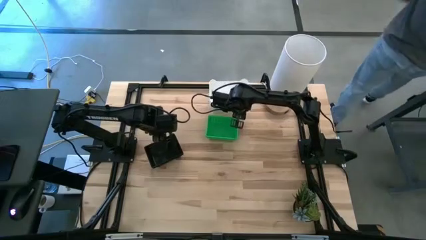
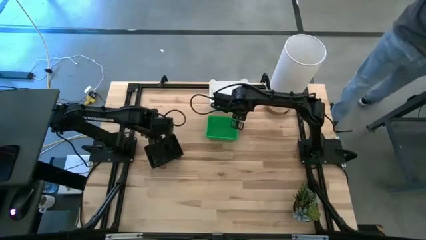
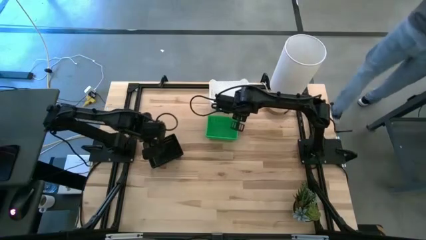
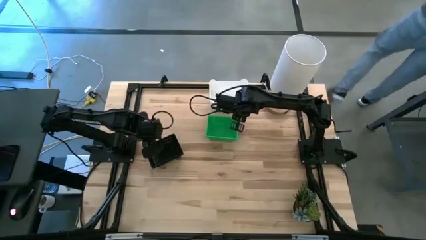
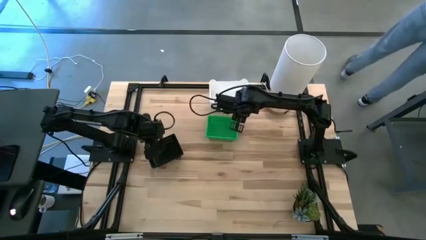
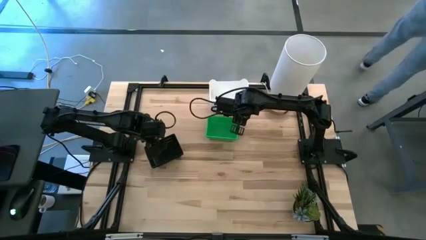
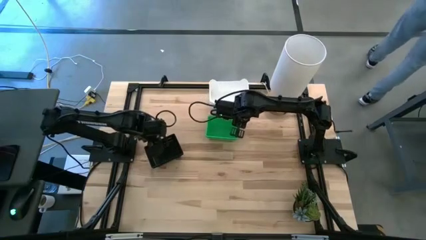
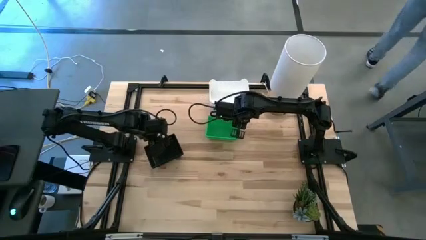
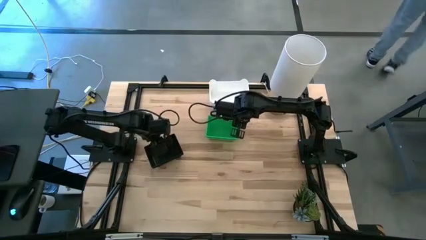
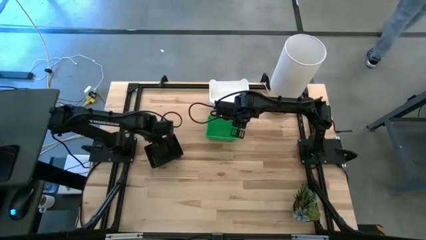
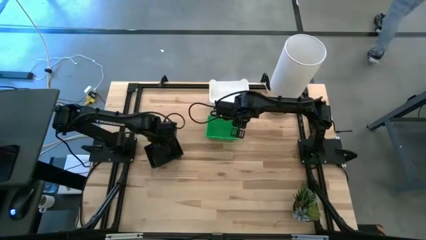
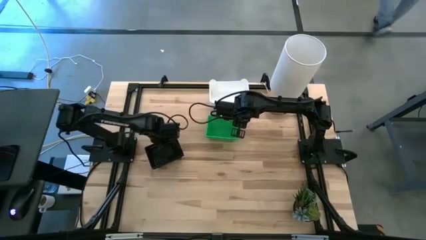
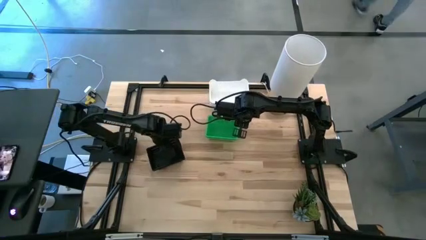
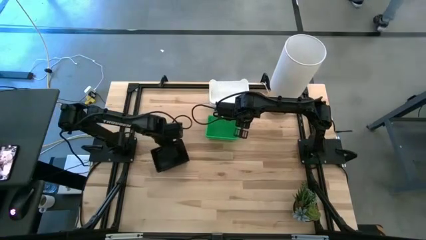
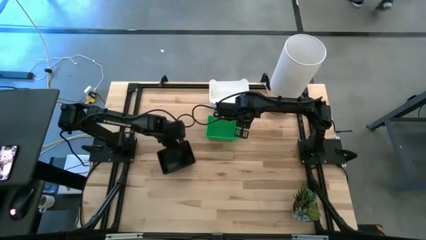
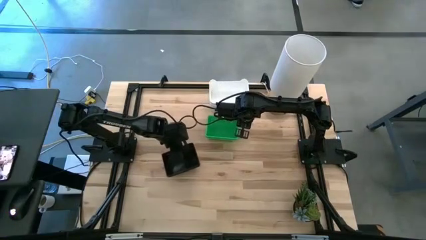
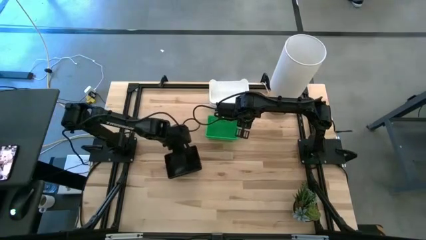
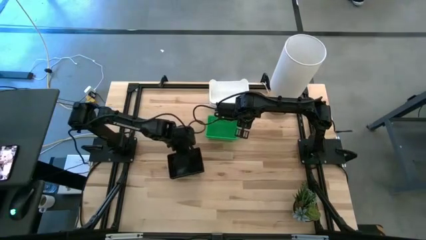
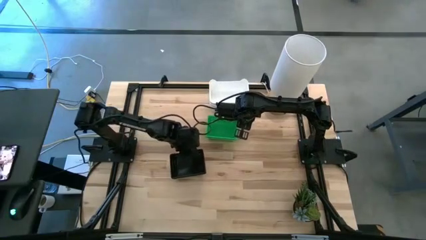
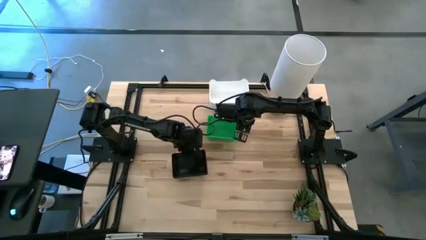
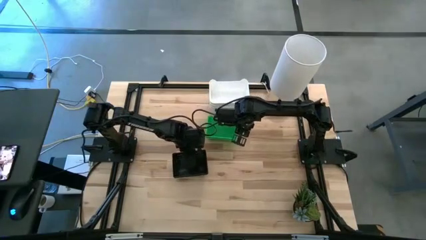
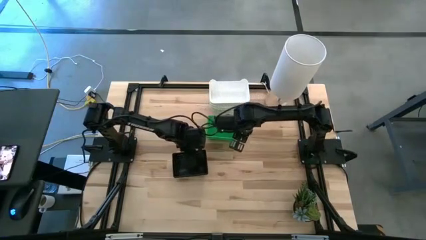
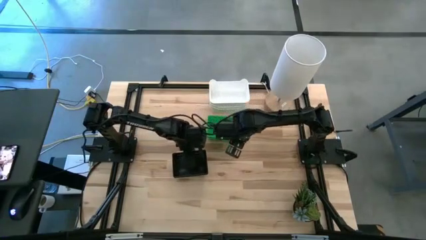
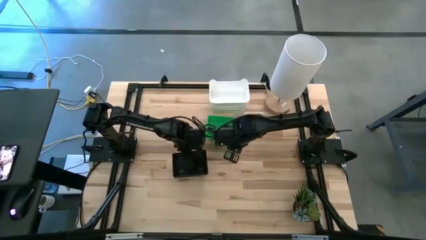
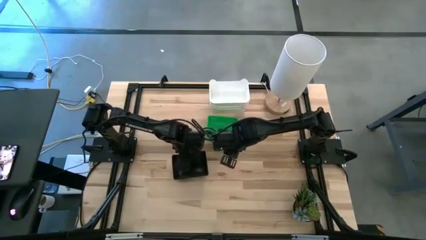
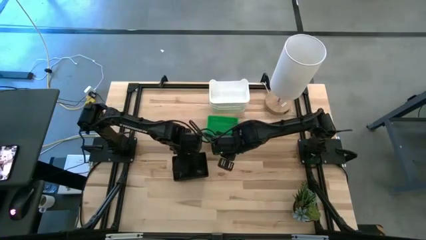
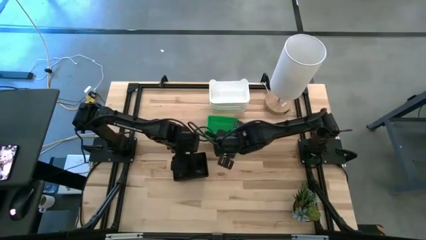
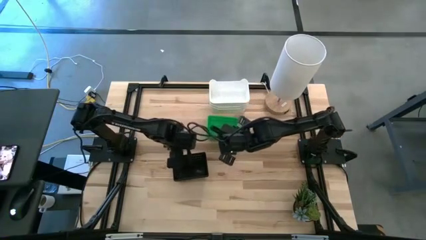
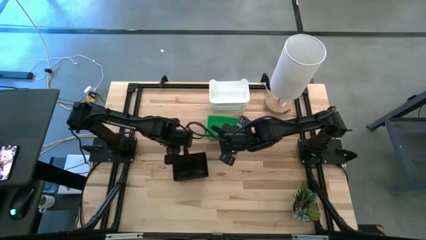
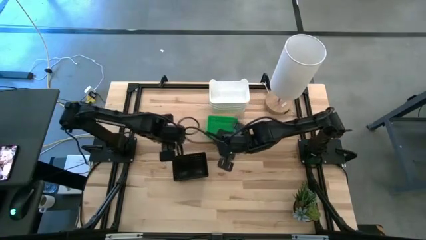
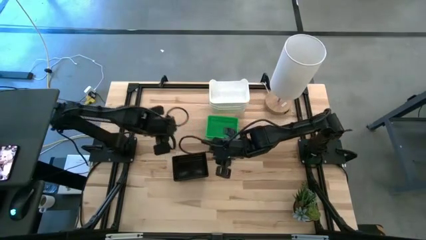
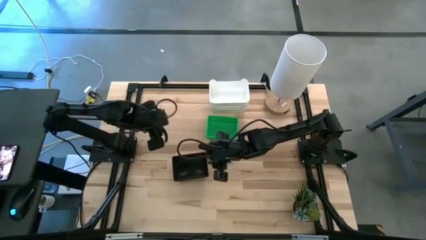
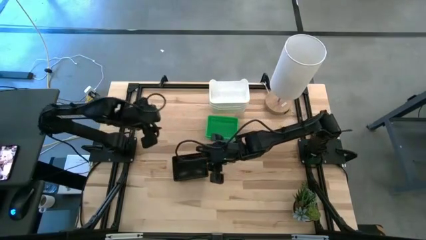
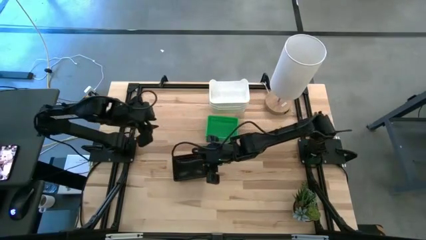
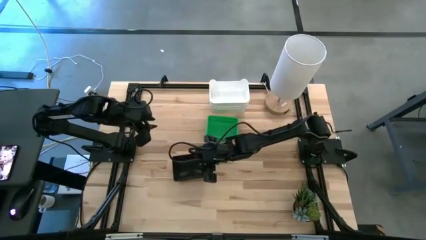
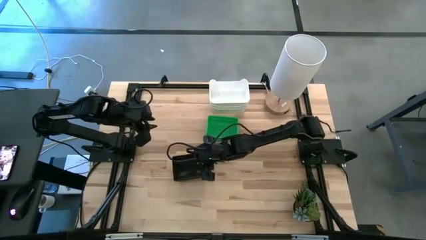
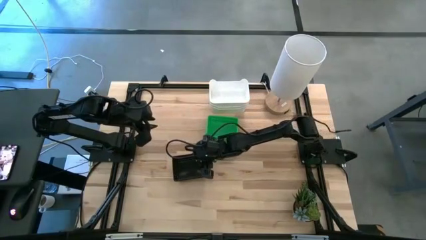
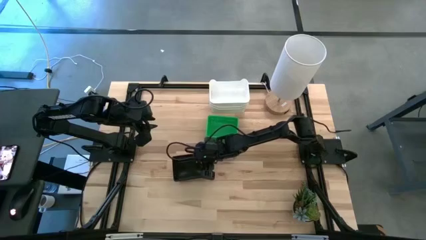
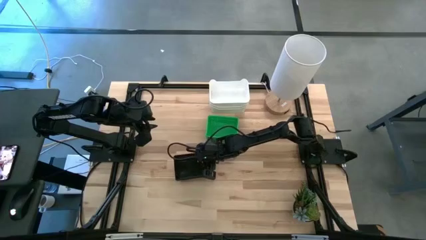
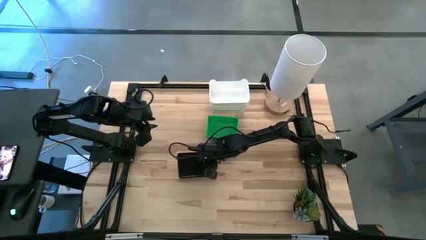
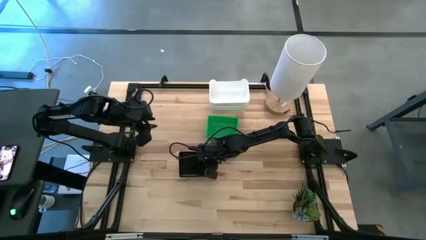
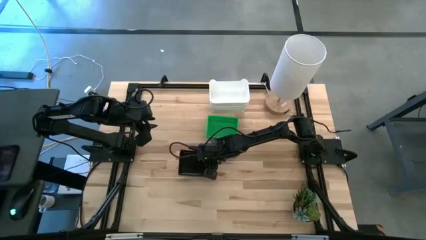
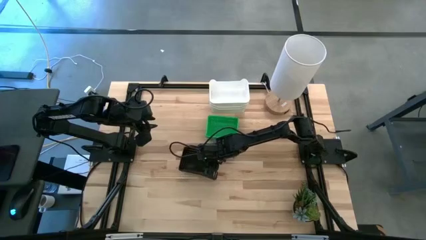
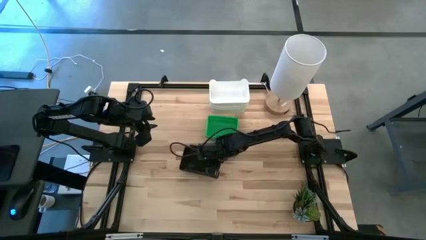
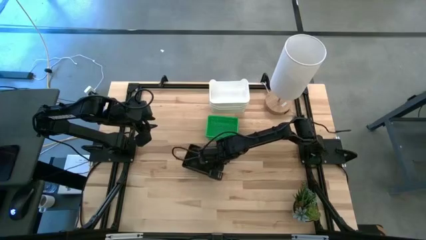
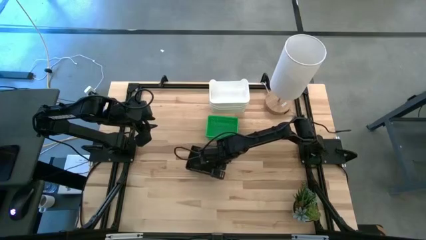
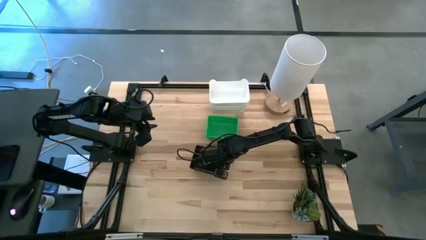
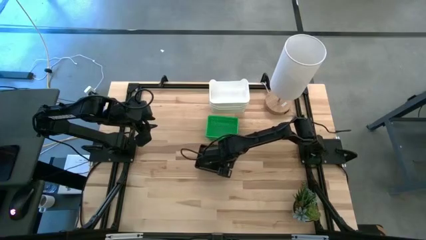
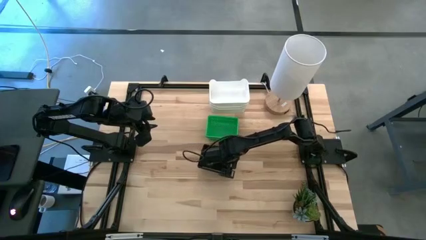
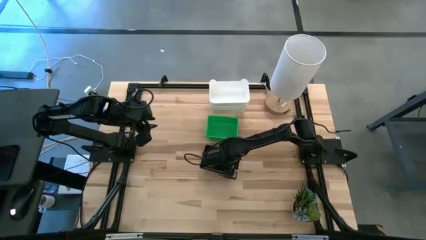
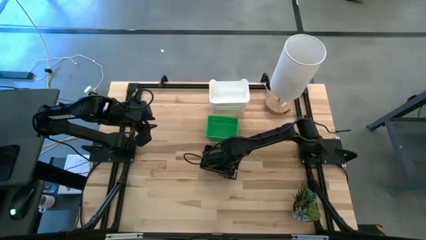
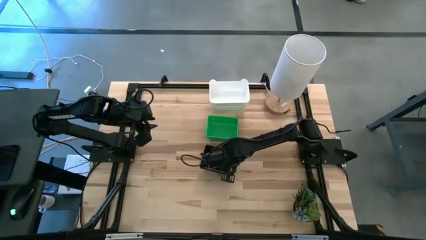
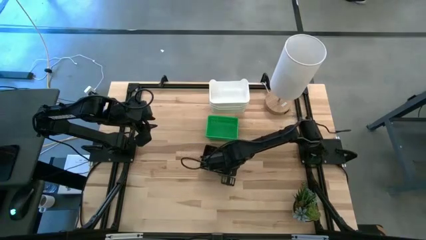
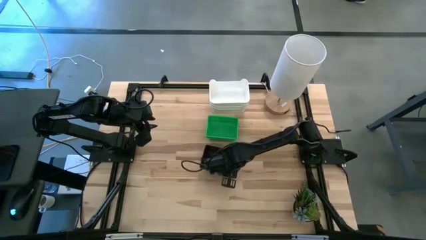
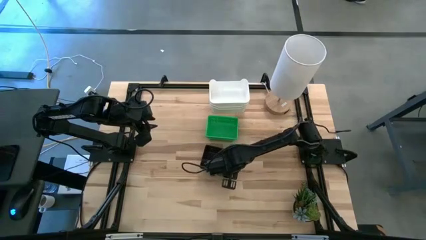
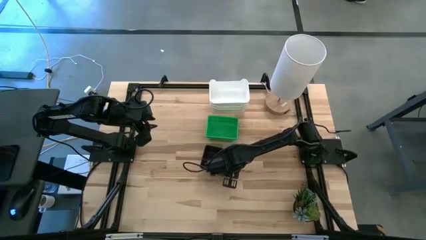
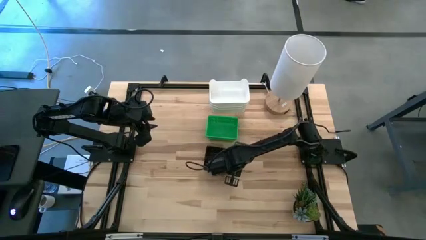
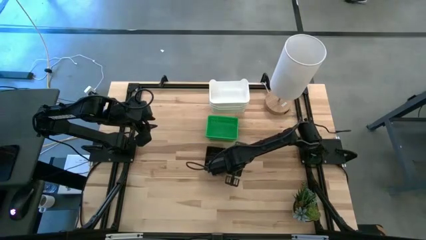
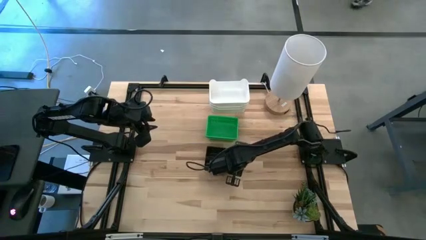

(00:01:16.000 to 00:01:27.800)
Move the black bins to the center of the table

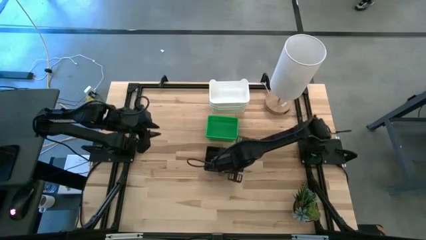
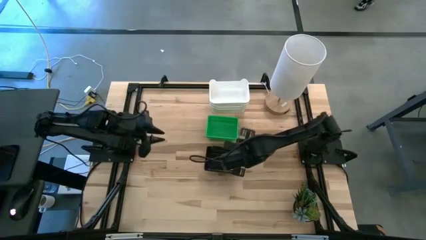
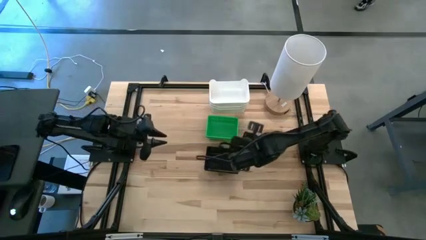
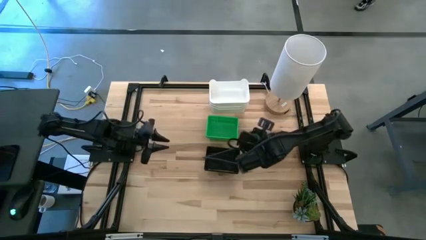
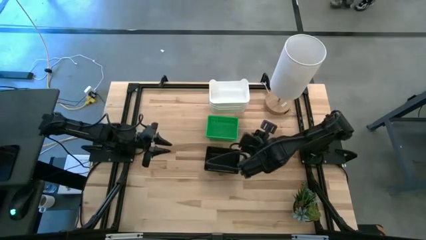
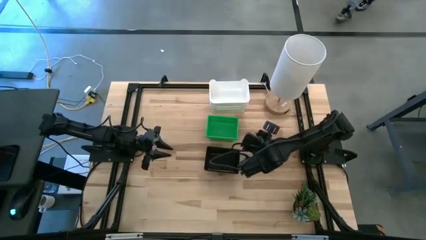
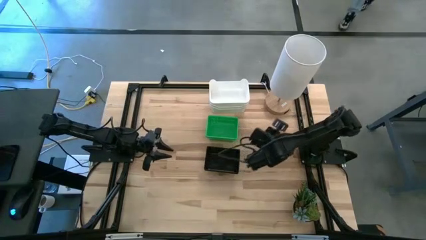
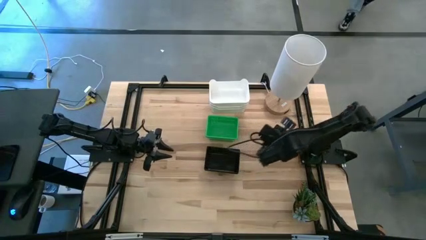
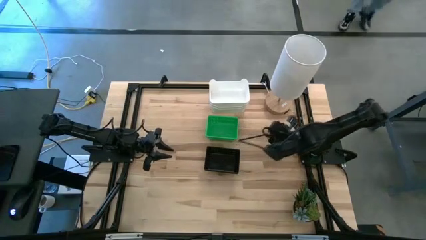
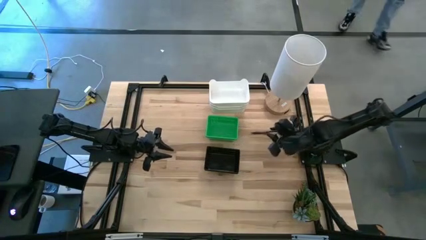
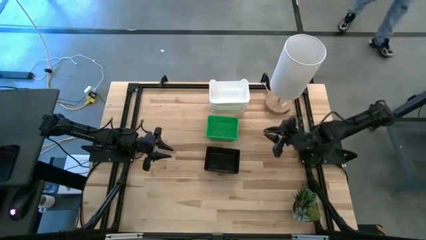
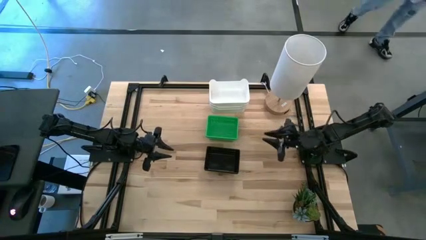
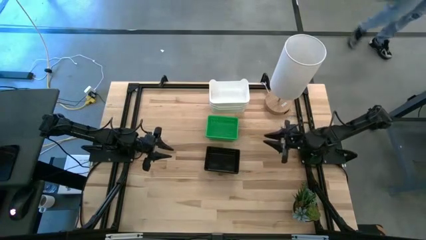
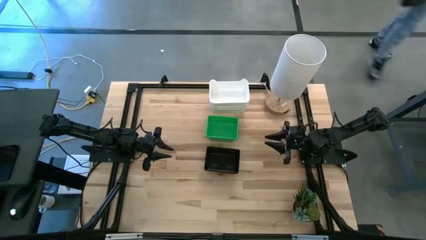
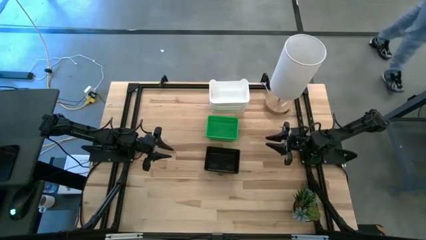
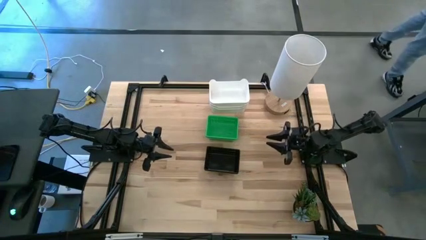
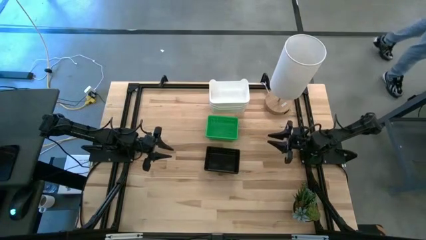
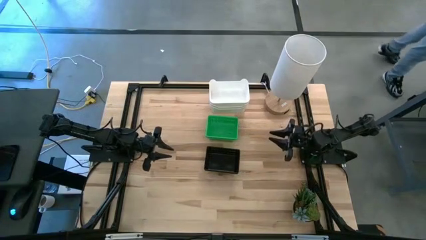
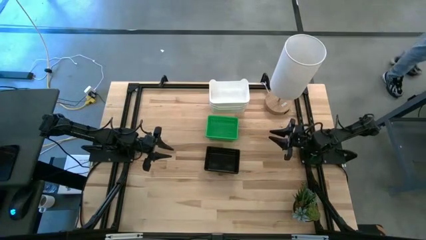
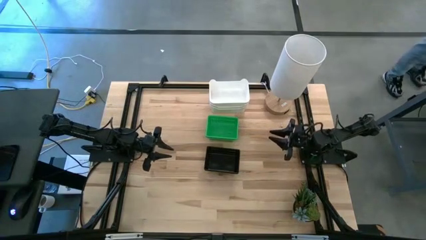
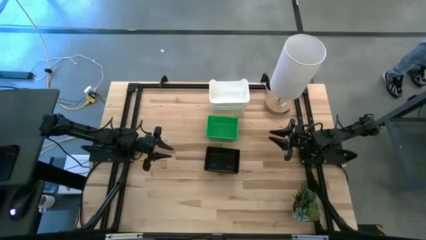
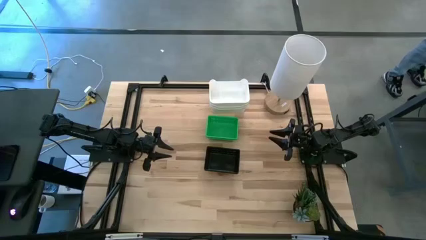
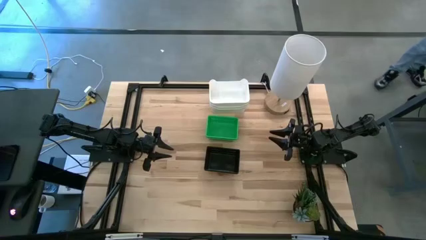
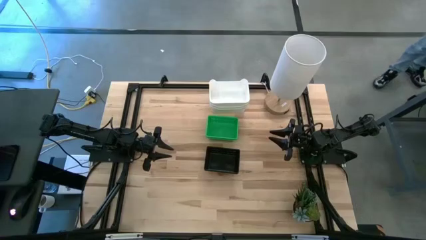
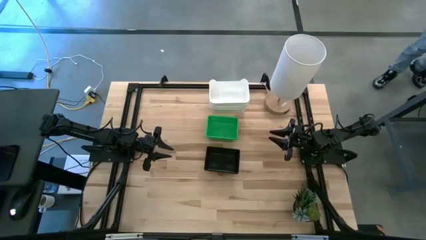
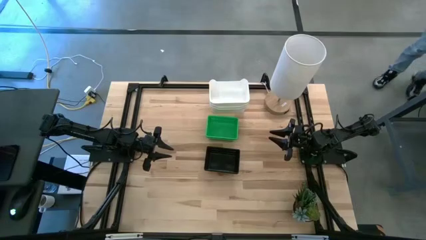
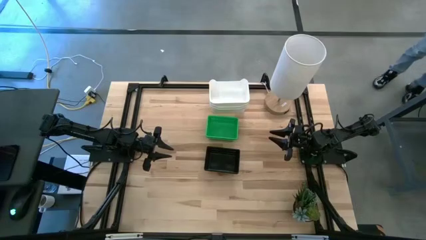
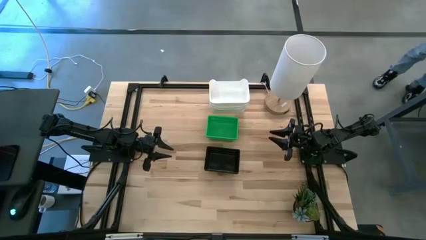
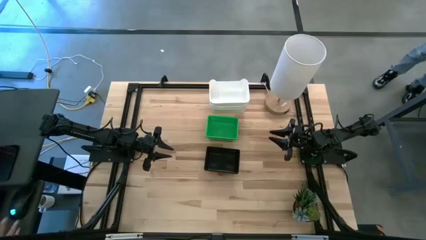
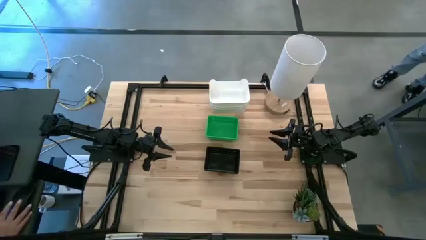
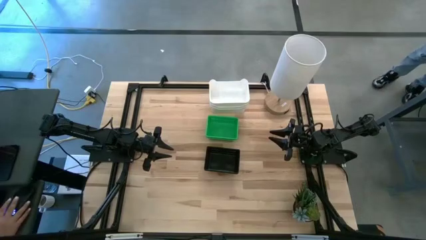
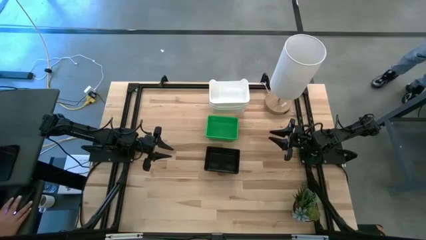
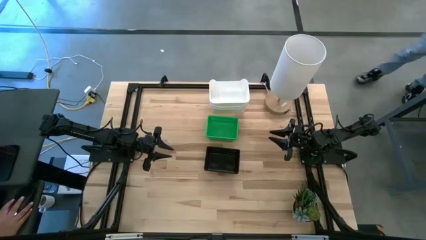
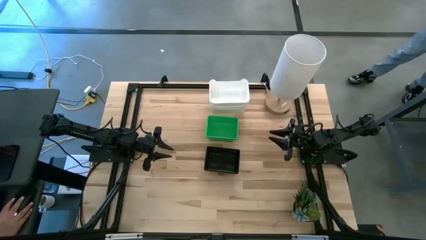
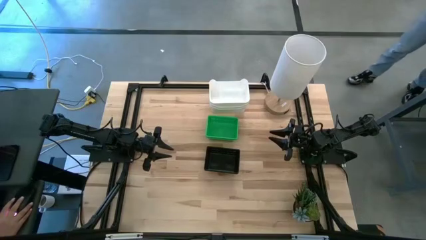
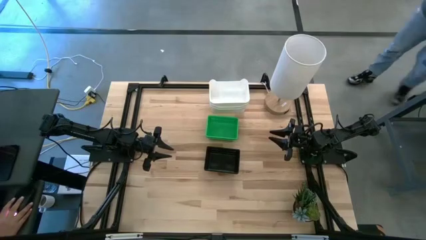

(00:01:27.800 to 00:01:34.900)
Return to Home Position
